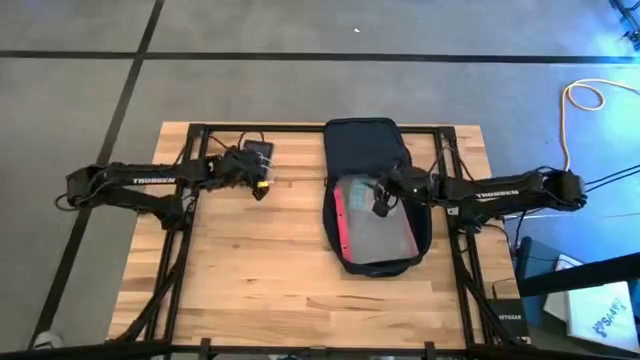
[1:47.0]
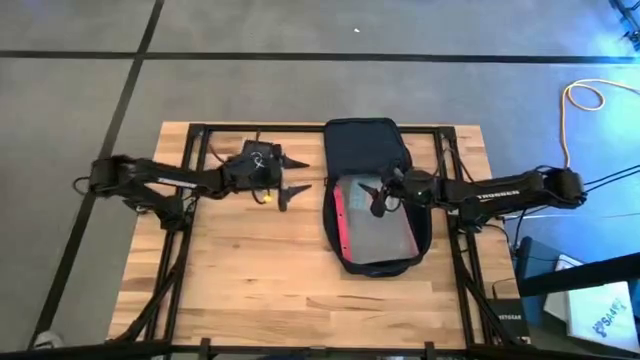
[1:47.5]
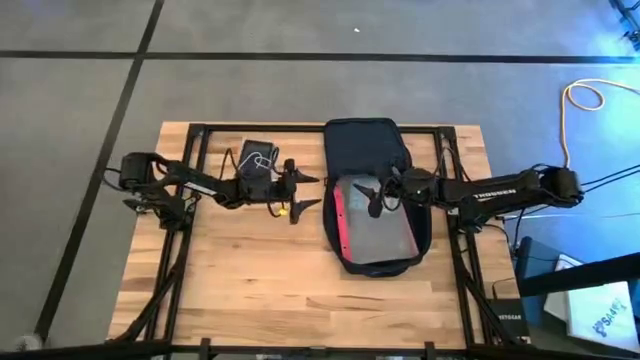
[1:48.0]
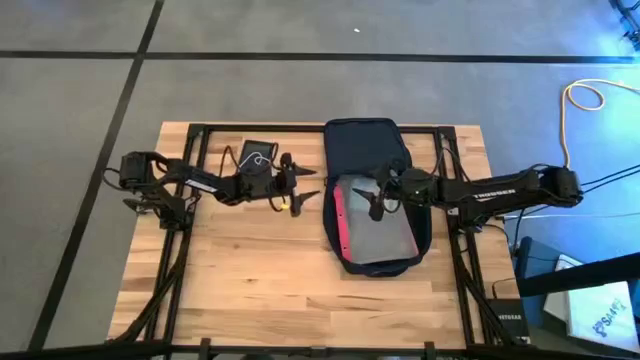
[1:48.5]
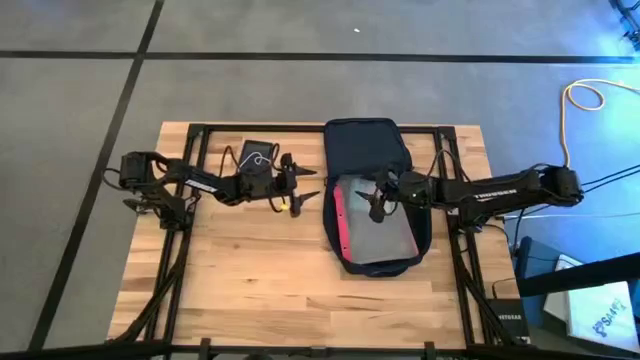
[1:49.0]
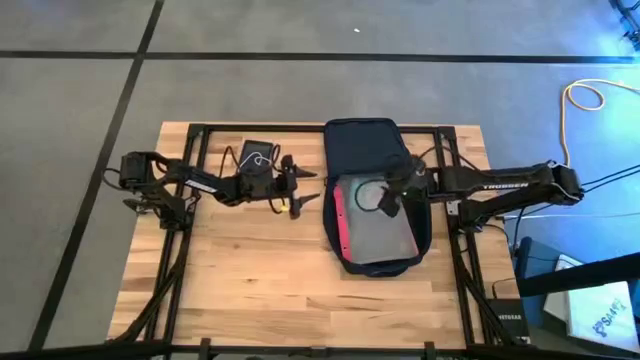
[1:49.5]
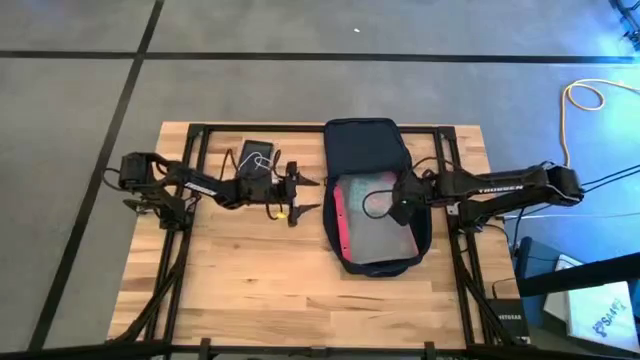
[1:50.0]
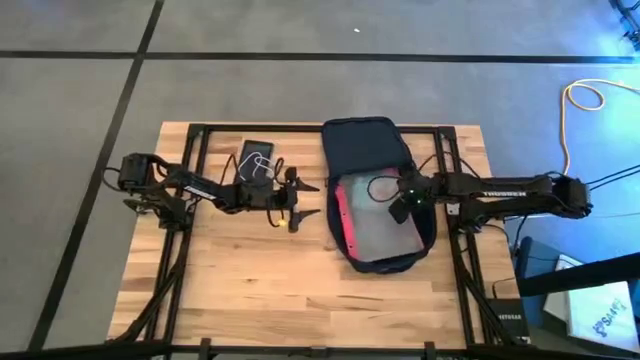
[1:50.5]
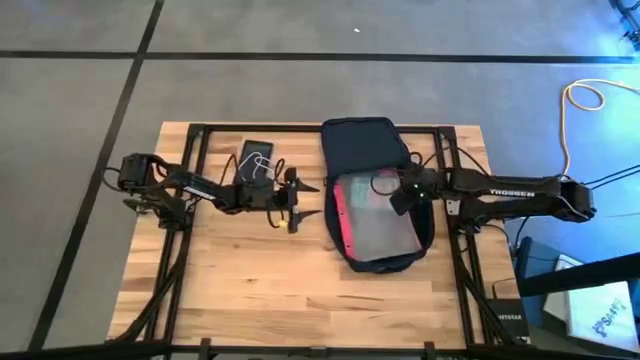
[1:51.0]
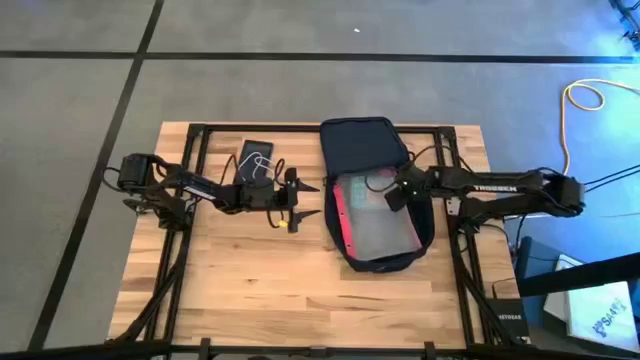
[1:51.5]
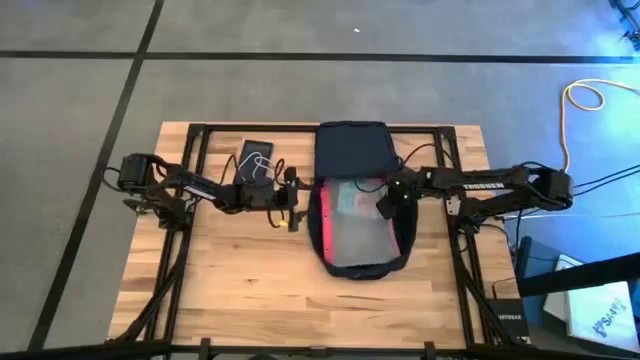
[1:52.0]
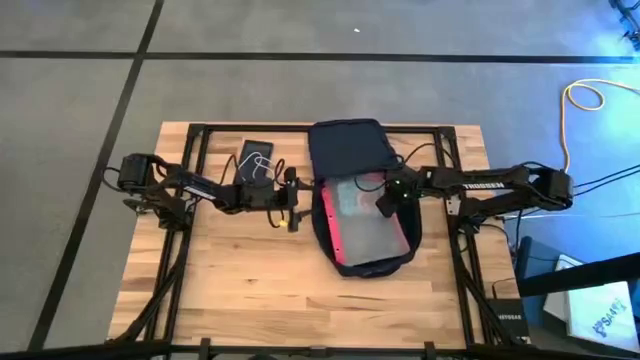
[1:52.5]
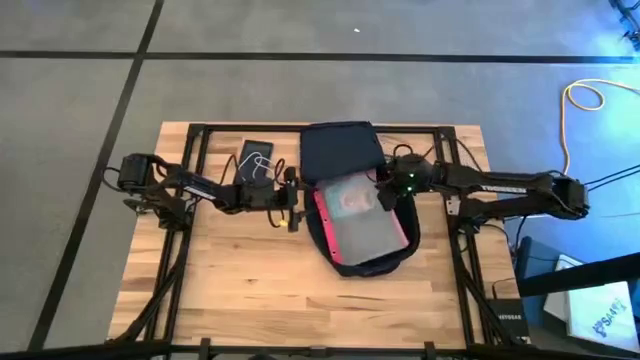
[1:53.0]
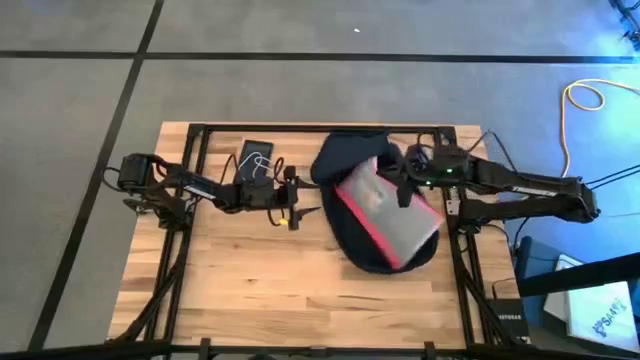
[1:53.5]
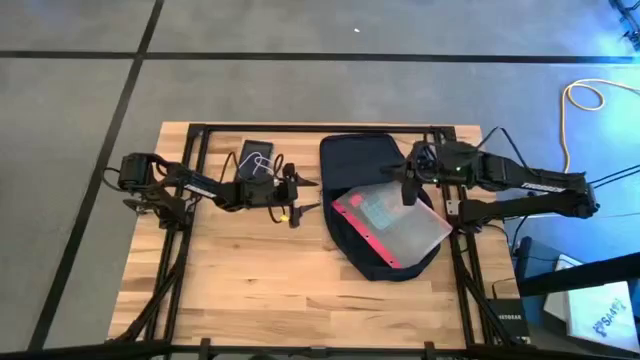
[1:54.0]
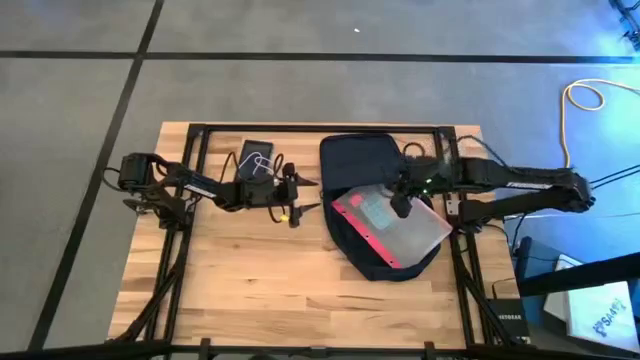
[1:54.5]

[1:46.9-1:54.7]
Task: Unpack backpack
Remove the transparent zip bag from the blue backpack

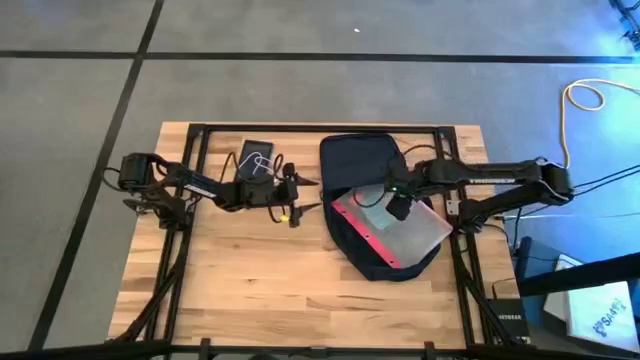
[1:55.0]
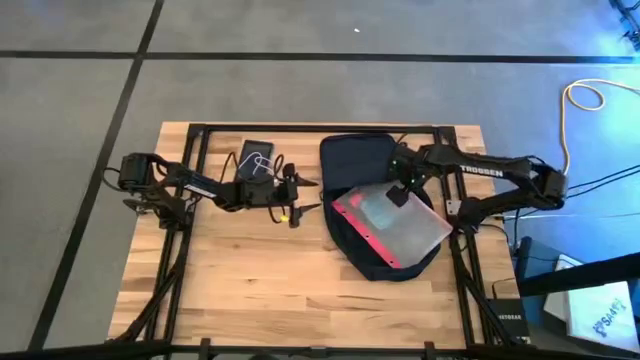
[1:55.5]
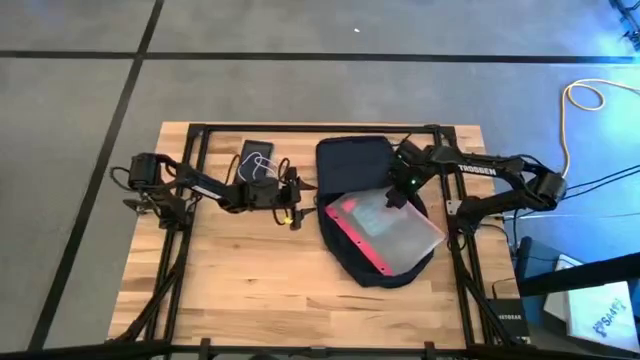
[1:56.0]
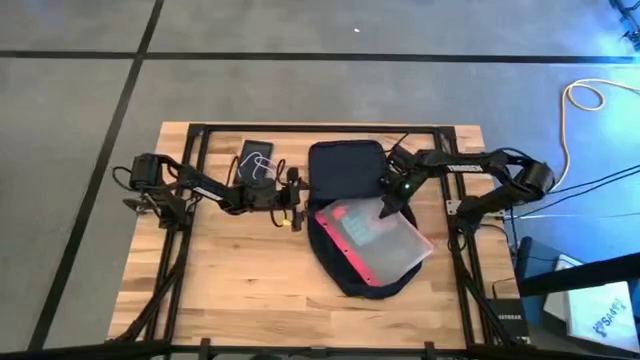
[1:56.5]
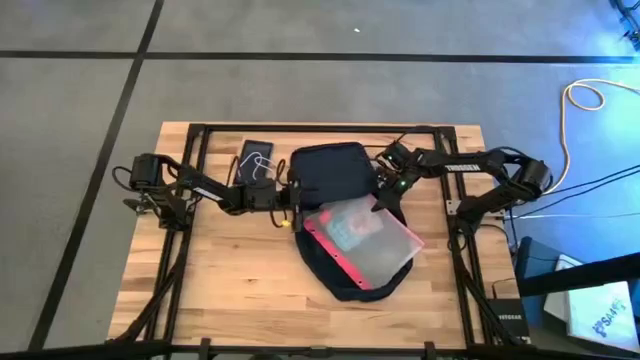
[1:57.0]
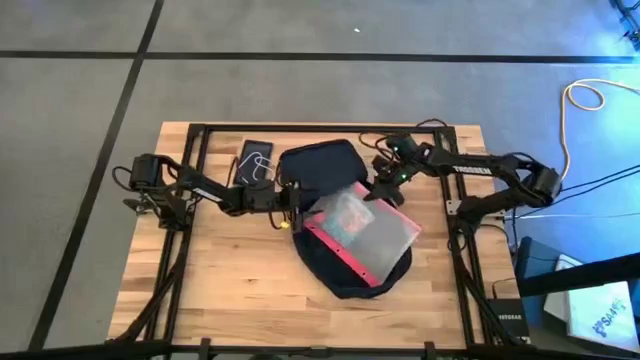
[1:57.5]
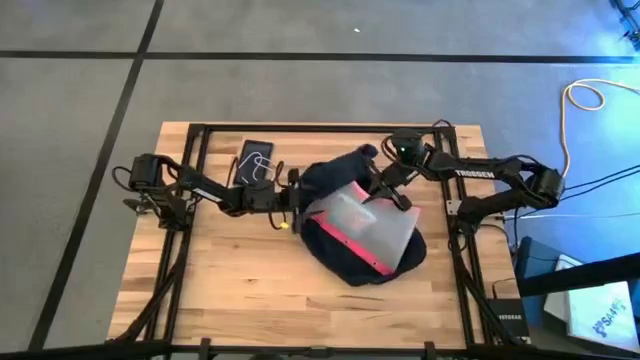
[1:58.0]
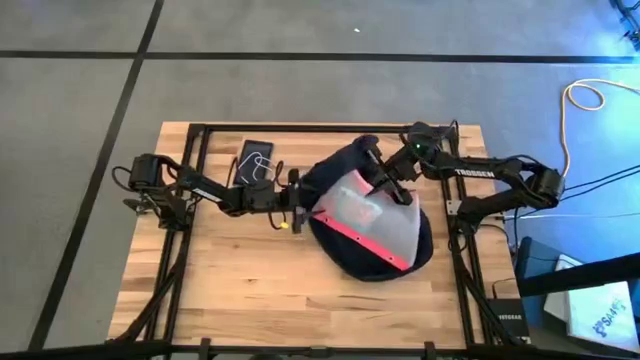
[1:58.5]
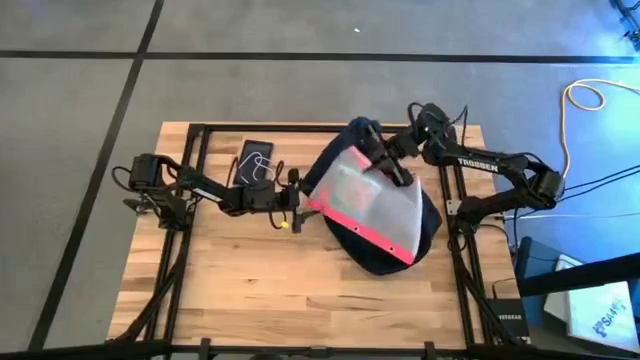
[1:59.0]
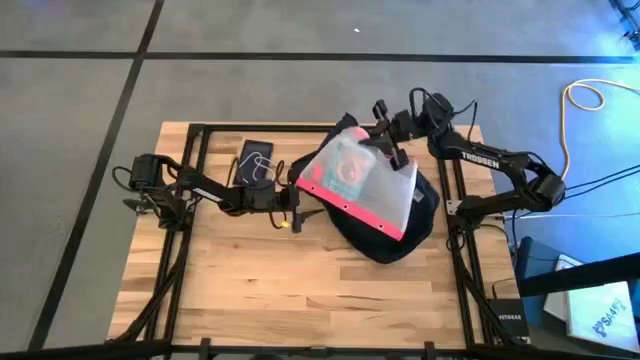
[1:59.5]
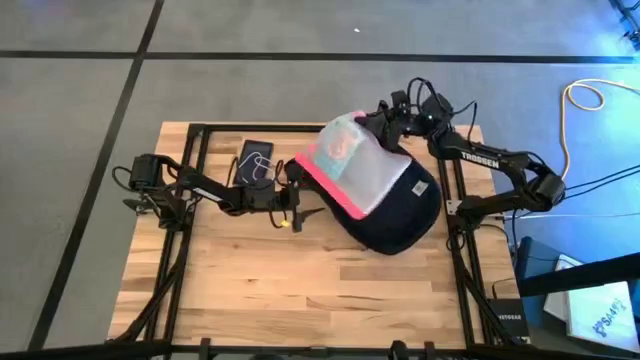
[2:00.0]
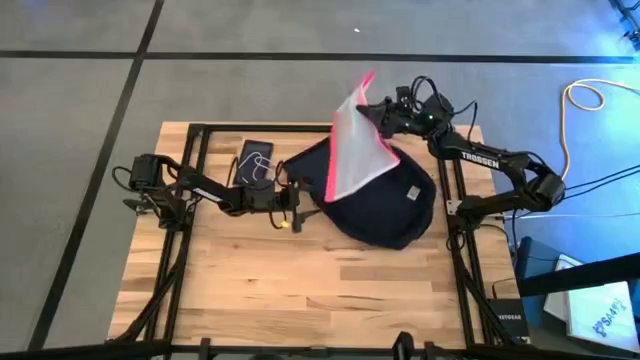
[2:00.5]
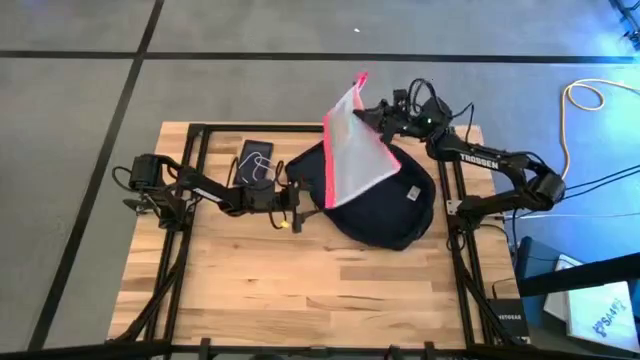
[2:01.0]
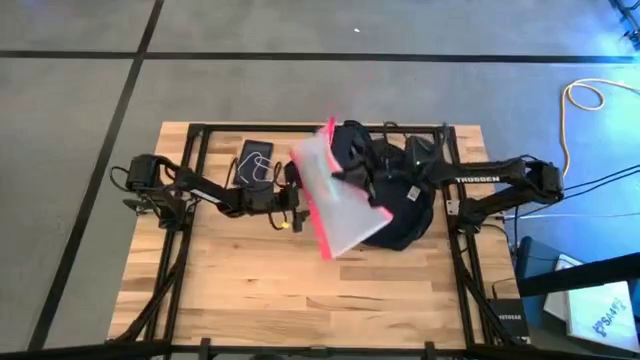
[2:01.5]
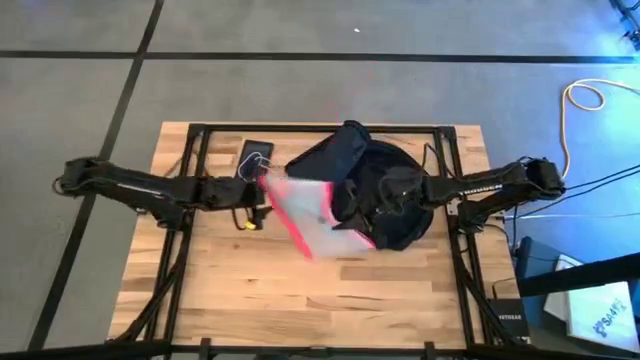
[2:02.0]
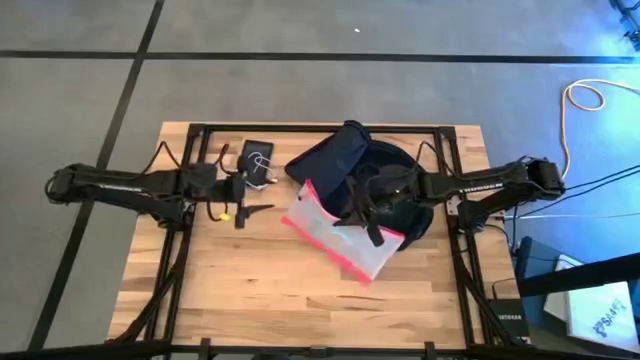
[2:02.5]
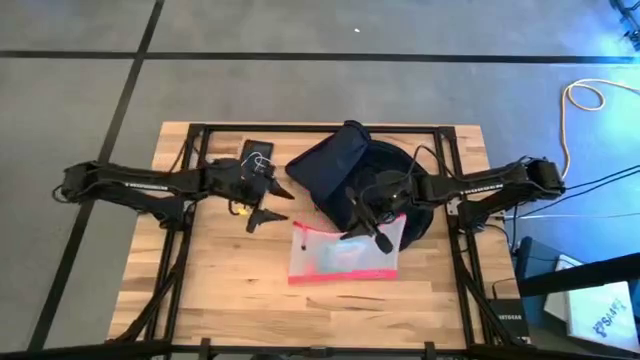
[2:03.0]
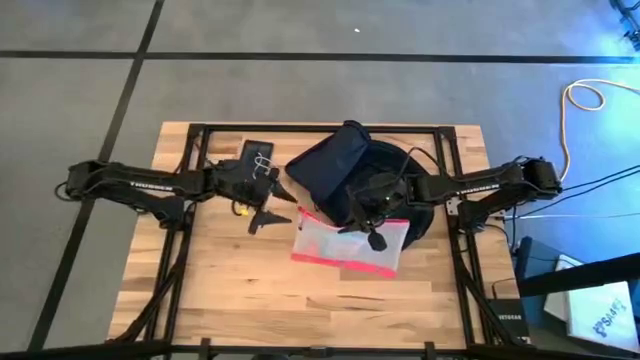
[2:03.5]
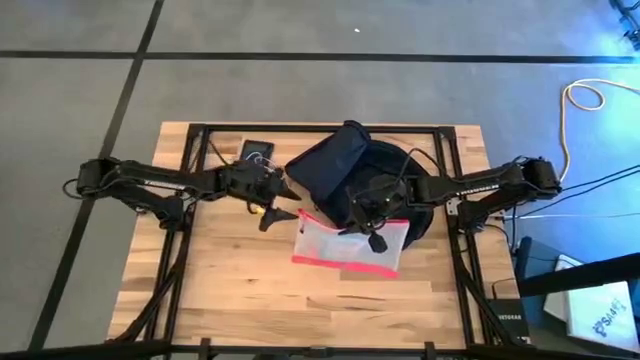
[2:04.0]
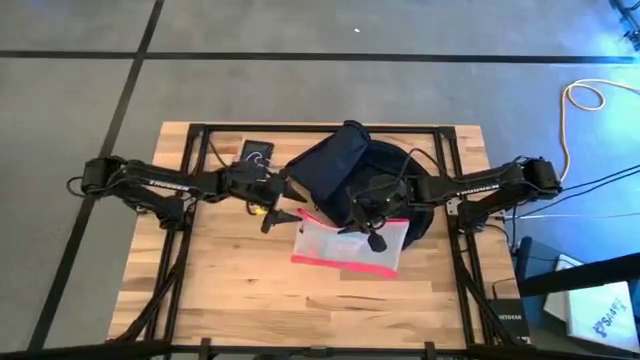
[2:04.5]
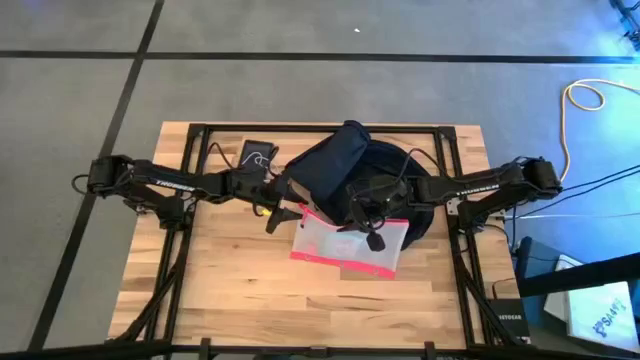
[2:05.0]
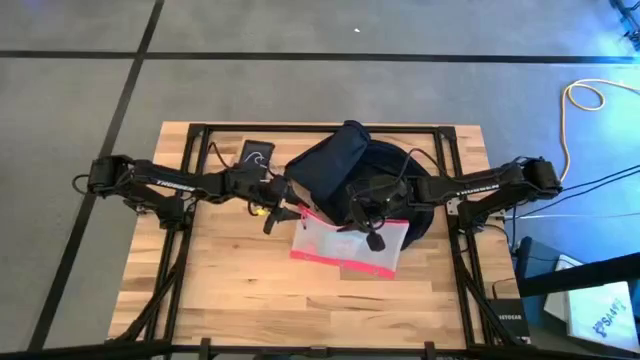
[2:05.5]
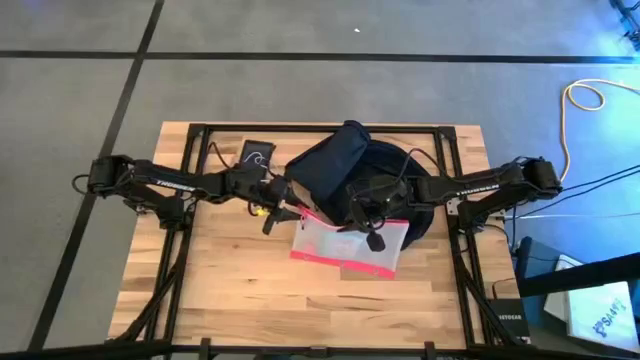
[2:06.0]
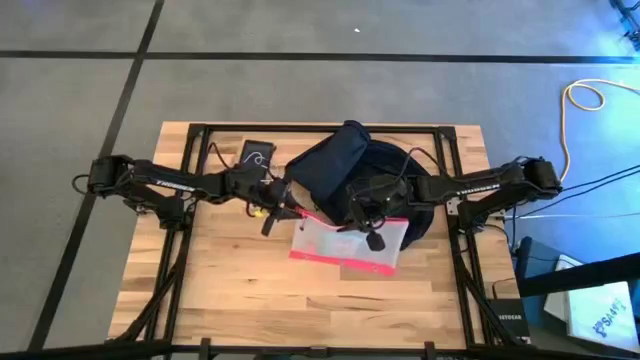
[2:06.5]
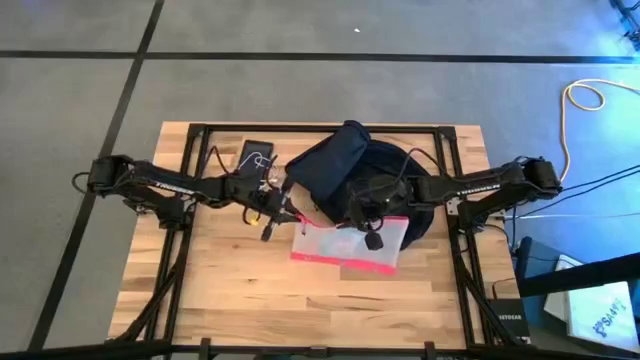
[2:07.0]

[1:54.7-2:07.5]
Remove the transparent zip bag from the blue backpack
